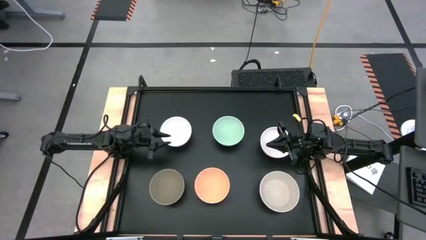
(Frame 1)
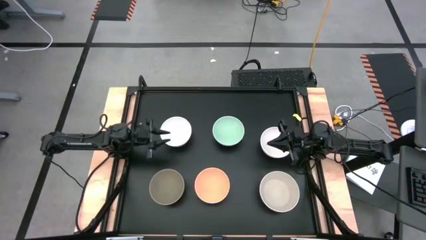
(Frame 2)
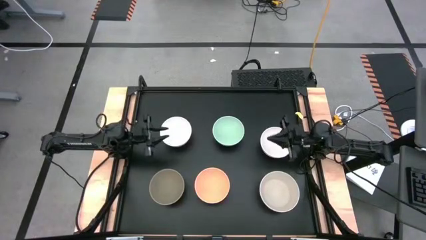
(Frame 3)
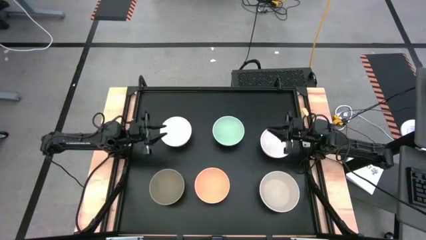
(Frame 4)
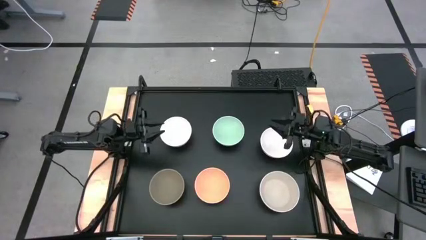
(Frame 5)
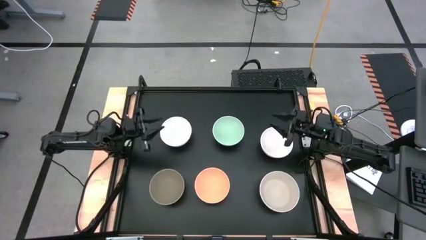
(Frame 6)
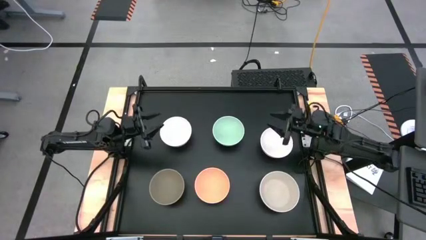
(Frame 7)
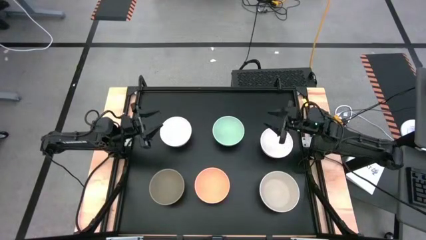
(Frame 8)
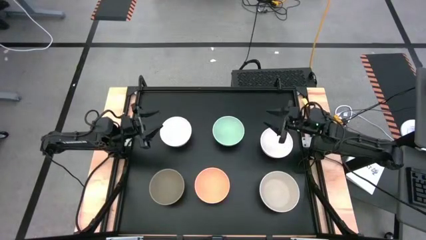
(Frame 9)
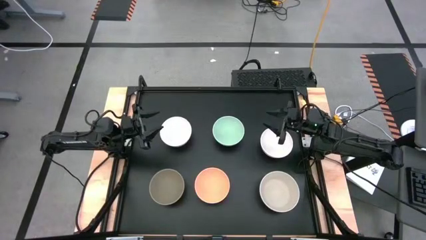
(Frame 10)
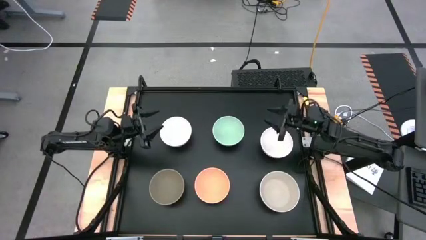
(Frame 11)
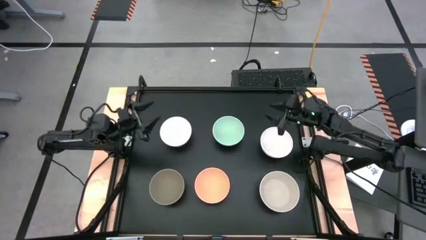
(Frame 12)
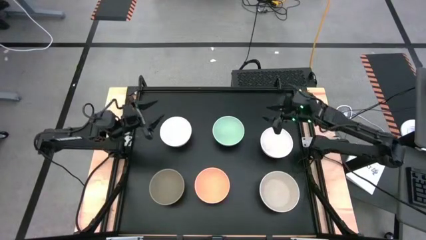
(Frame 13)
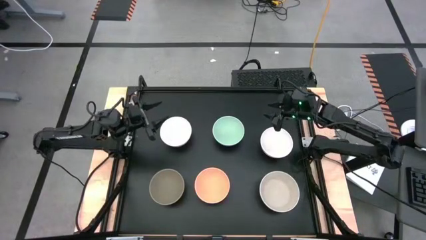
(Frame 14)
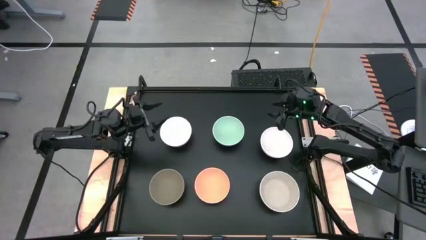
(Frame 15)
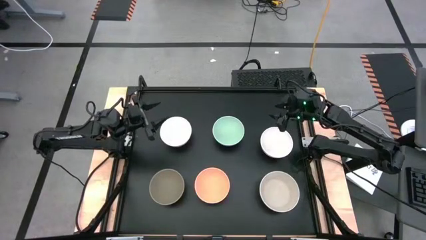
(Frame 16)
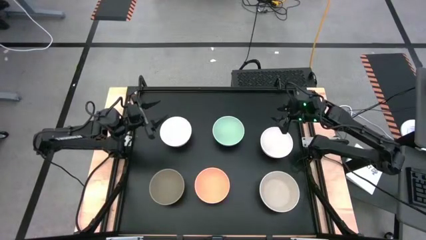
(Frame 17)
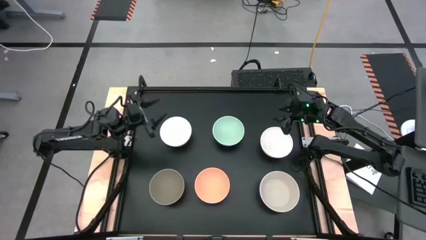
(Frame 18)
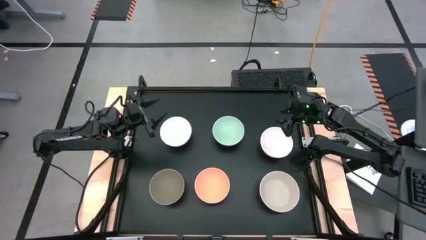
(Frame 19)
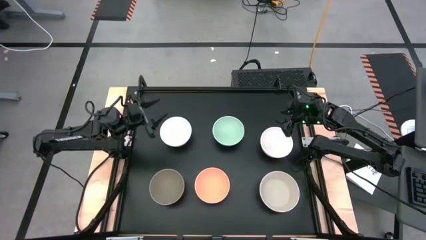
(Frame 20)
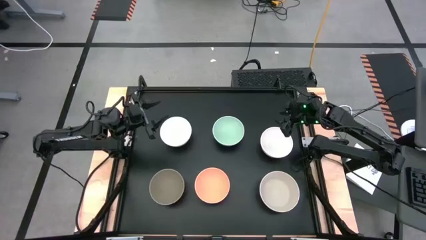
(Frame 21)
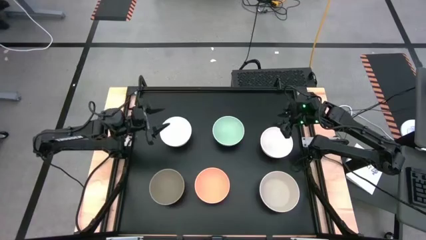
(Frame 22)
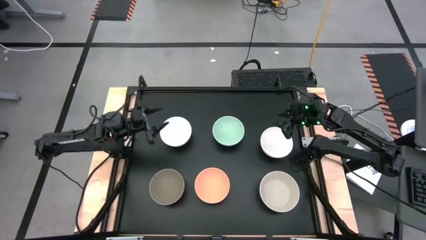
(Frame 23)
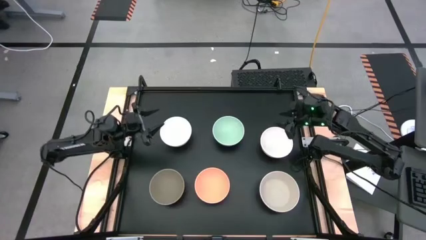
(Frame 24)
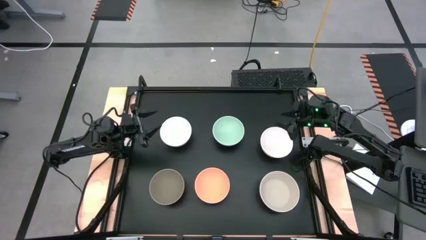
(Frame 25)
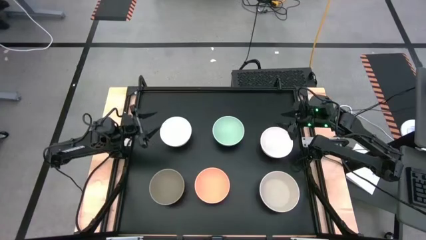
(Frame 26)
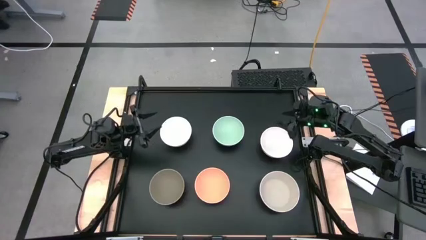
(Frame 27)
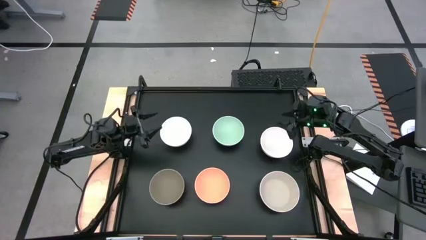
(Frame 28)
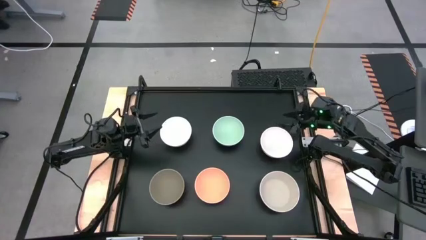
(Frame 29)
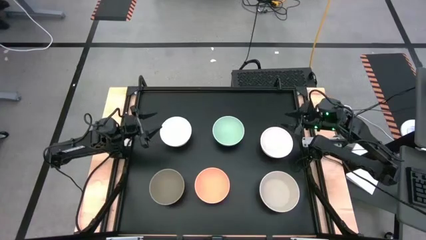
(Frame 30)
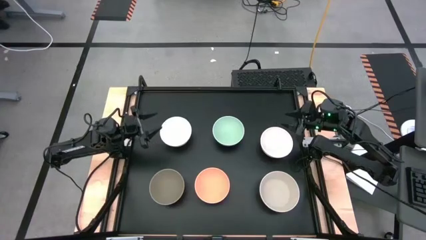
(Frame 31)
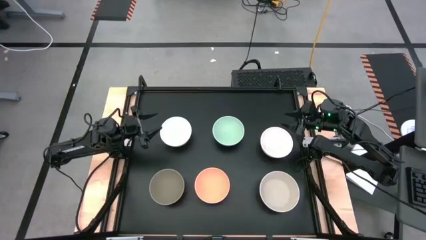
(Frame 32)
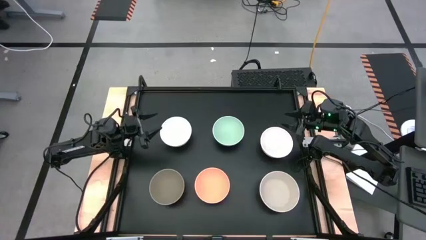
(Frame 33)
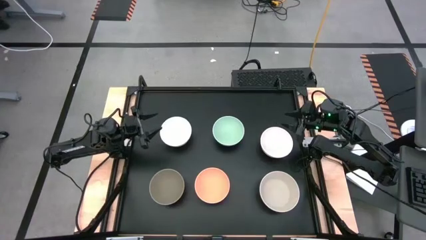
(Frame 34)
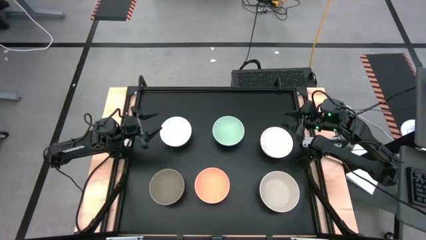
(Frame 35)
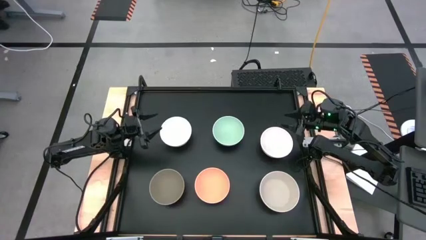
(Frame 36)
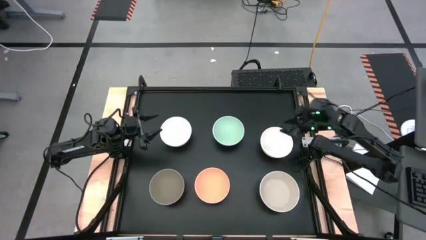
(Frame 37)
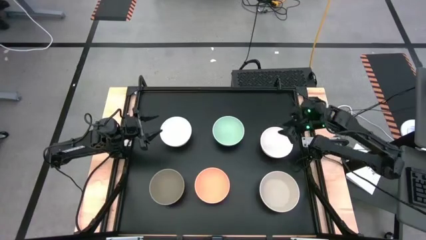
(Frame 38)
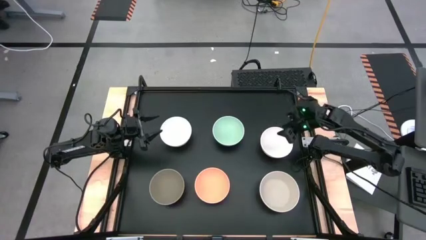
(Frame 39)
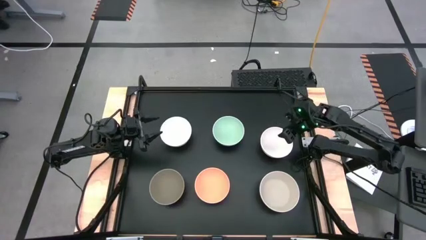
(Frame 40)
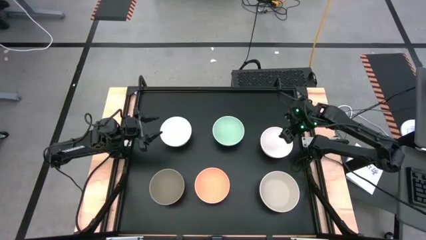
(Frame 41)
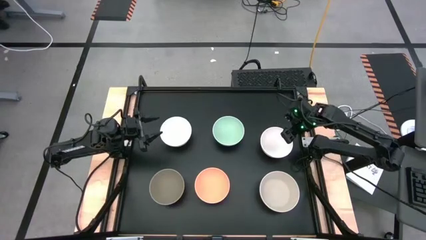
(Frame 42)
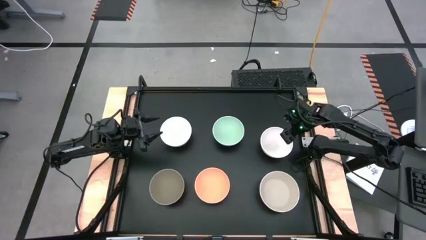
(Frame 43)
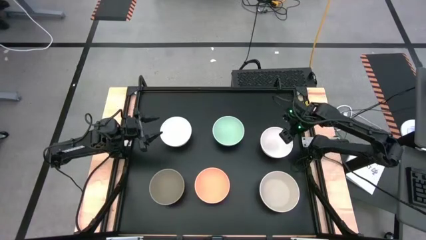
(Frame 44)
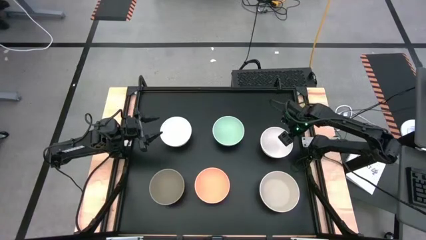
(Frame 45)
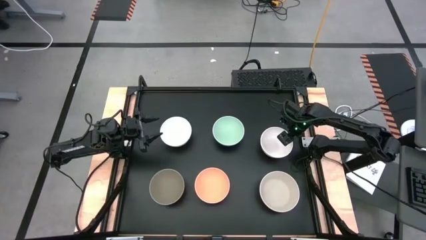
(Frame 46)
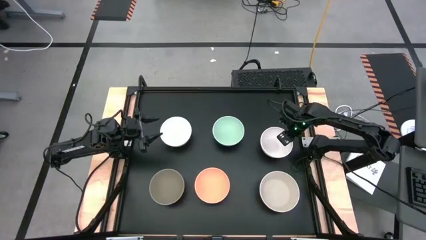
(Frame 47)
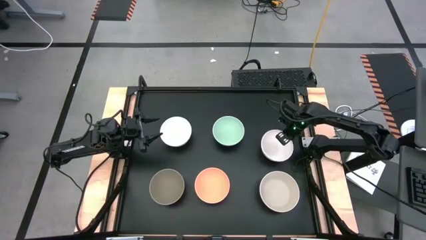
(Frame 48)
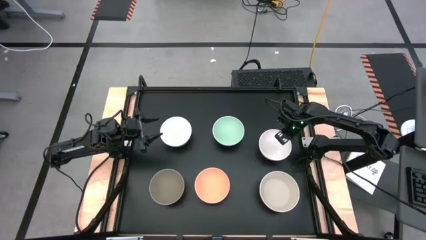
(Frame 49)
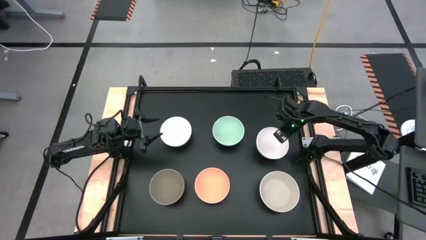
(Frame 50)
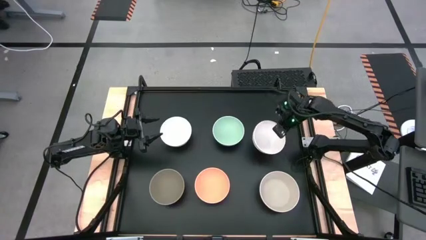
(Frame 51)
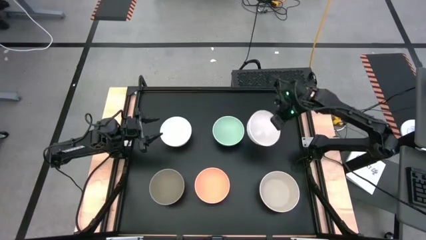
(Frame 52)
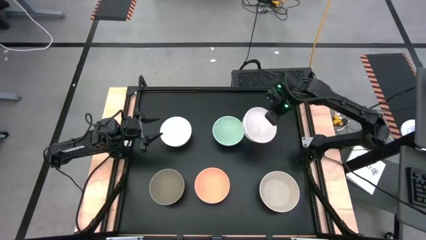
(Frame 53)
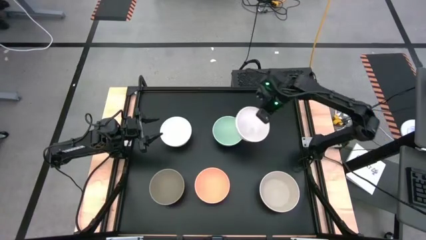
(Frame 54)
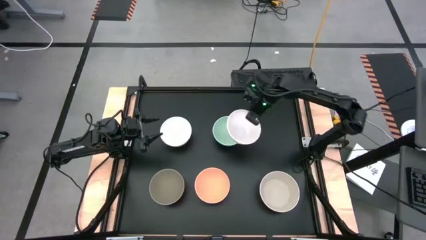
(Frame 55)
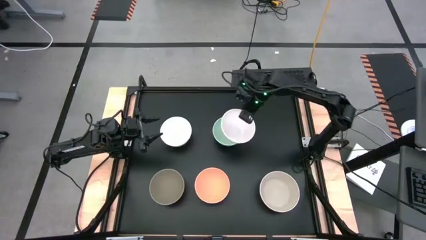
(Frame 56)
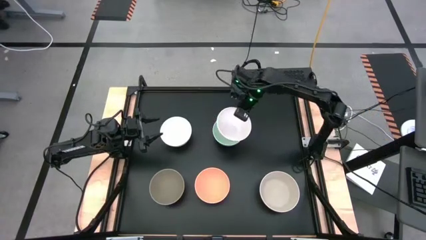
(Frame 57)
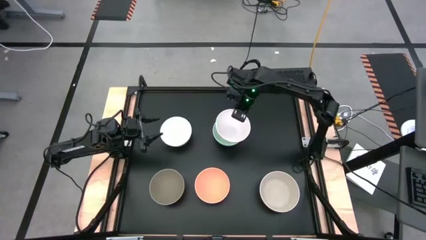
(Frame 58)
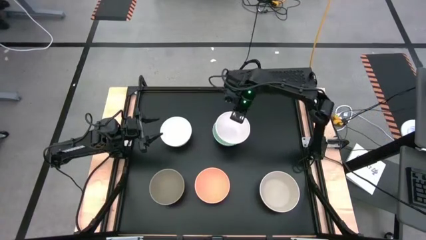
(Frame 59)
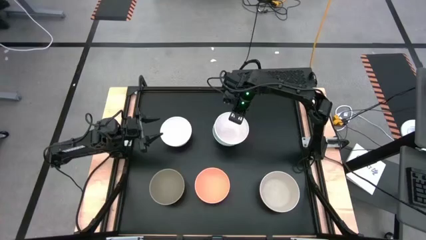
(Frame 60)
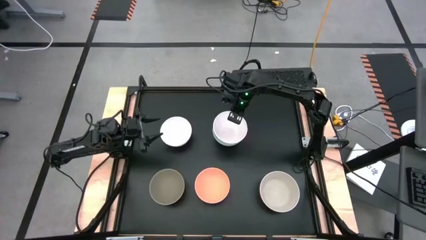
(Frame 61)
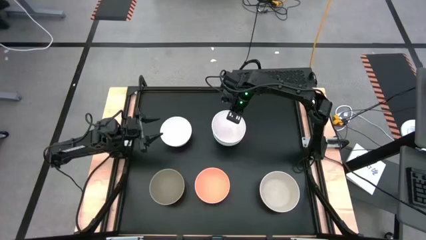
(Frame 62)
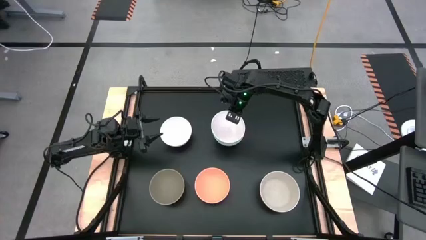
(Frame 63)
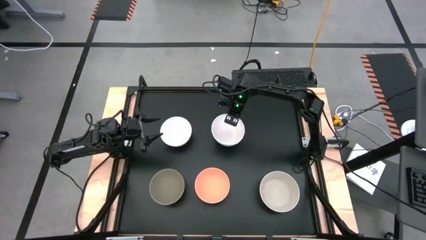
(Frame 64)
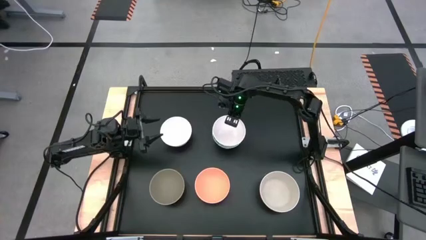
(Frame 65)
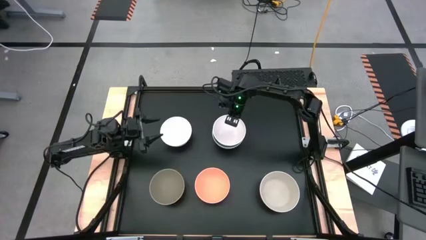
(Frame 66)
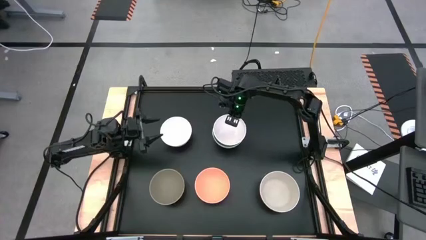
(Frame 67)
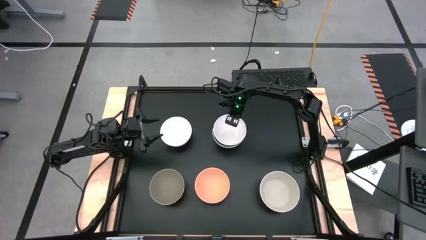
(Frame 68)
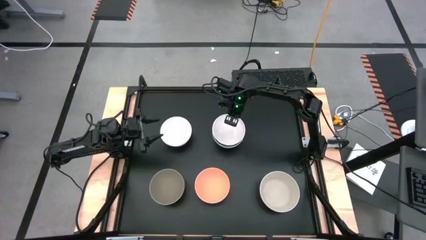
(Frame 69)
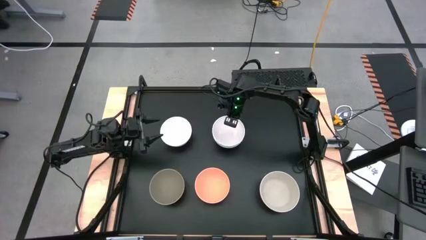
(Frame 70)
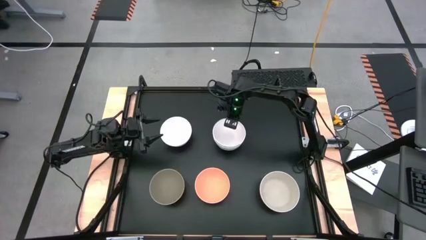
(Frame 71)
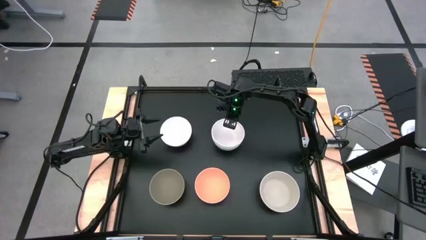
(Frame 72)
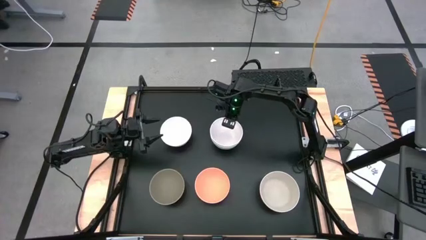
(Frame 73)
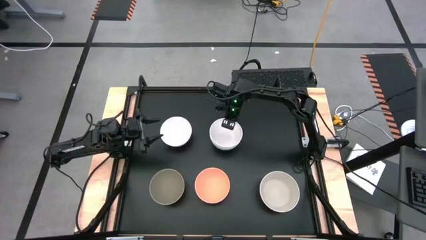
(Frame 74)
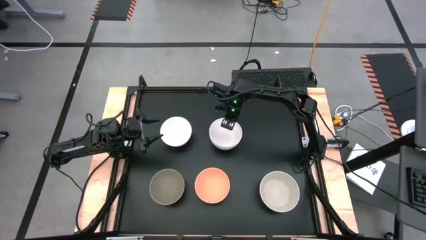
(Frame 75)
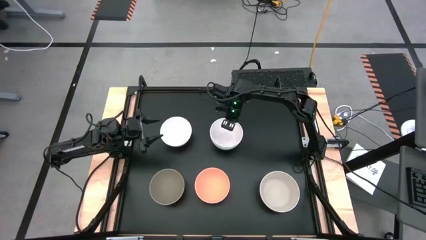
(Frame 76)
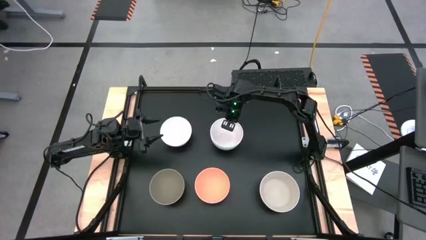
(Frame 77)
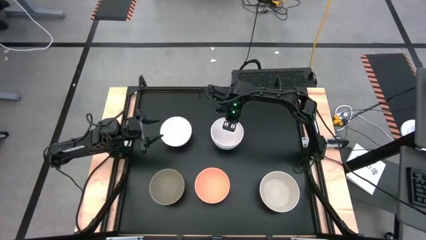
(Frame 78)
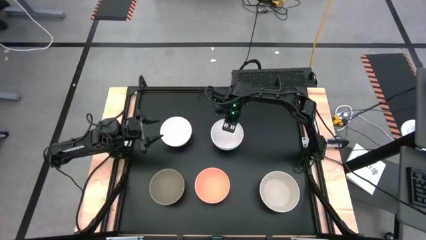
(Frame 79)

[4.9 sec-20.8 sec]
Task: Nest bowls inside each other
Stack the right white bowl on the light green bowl
